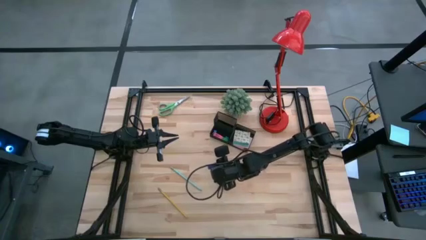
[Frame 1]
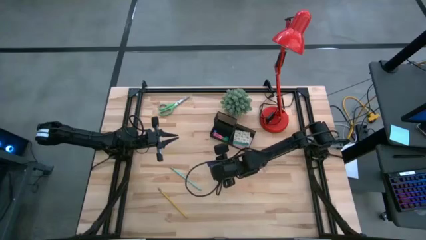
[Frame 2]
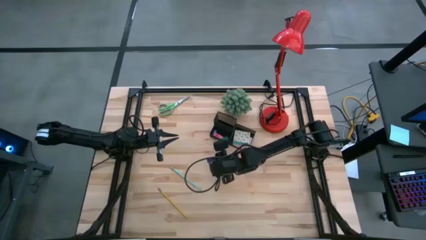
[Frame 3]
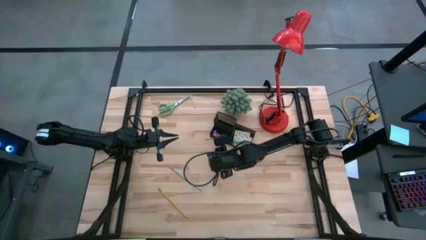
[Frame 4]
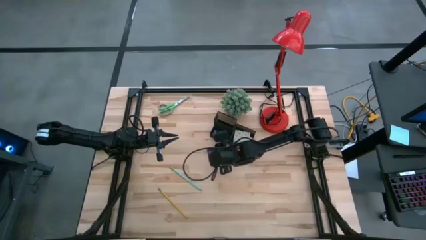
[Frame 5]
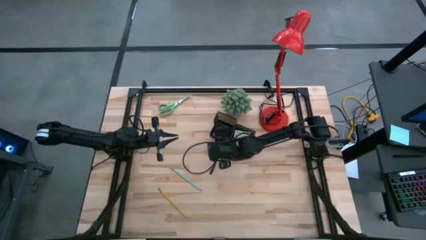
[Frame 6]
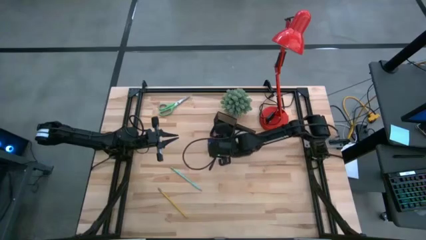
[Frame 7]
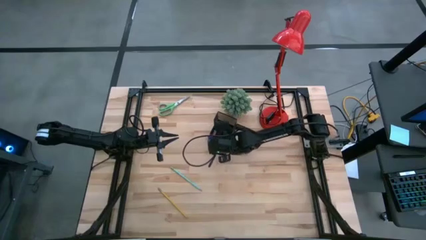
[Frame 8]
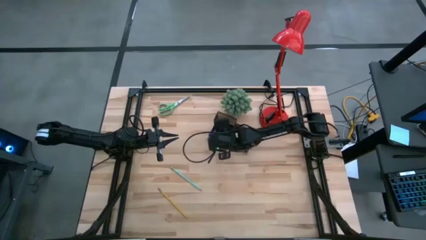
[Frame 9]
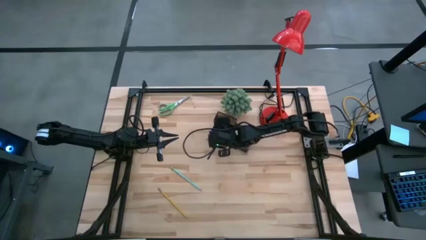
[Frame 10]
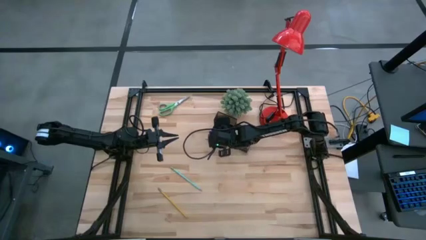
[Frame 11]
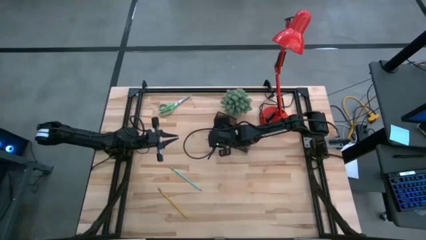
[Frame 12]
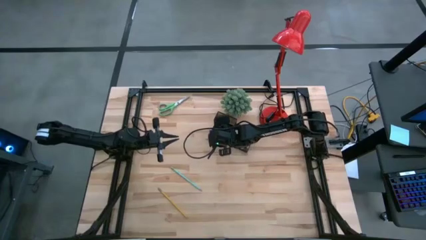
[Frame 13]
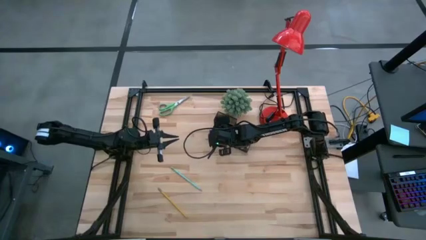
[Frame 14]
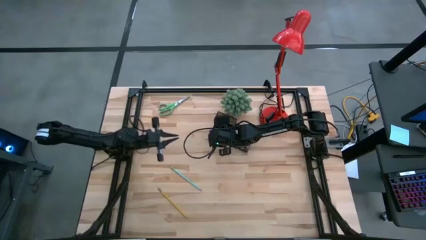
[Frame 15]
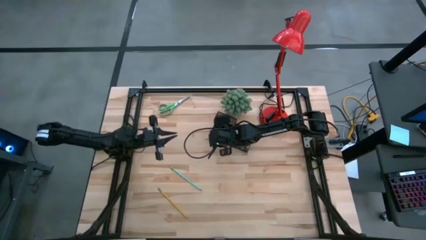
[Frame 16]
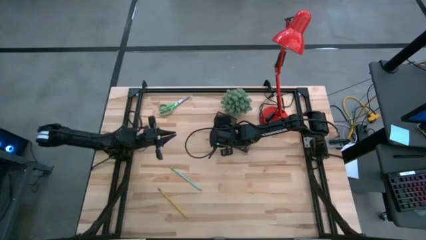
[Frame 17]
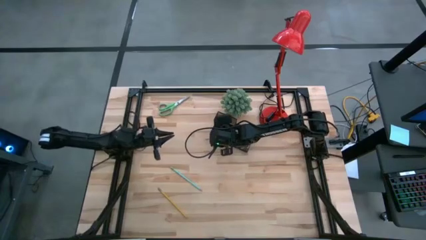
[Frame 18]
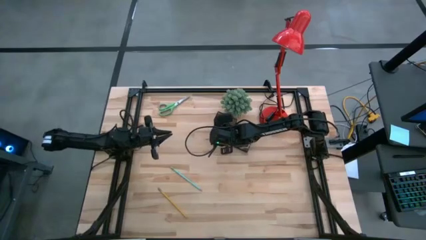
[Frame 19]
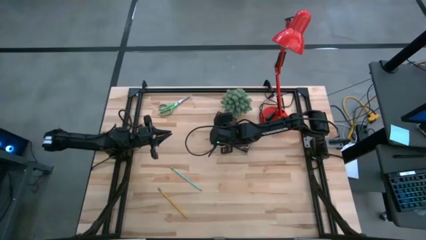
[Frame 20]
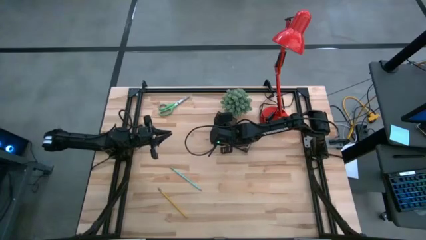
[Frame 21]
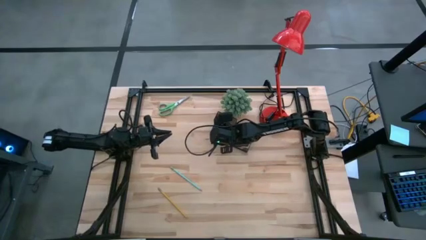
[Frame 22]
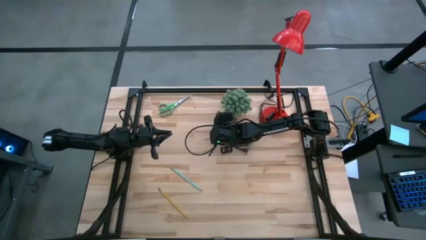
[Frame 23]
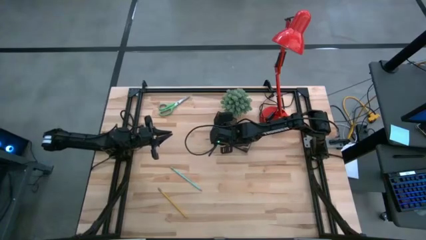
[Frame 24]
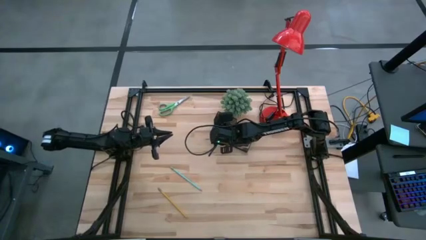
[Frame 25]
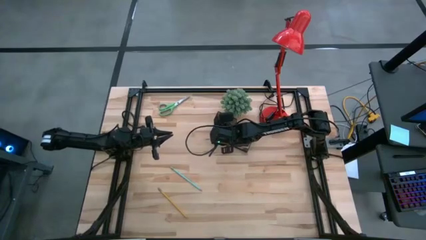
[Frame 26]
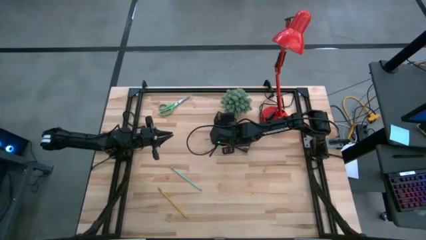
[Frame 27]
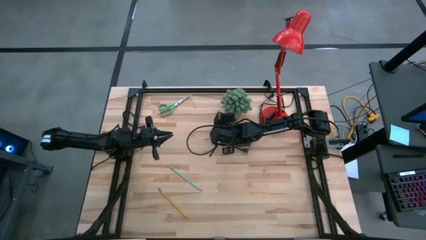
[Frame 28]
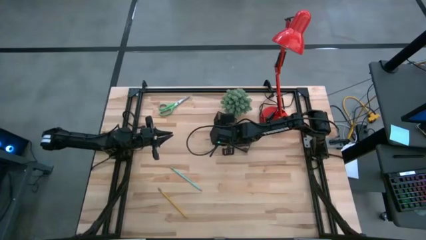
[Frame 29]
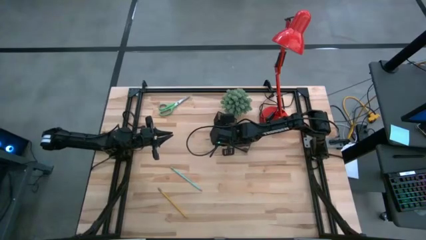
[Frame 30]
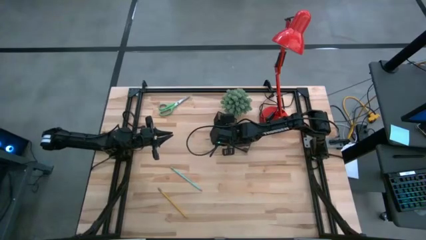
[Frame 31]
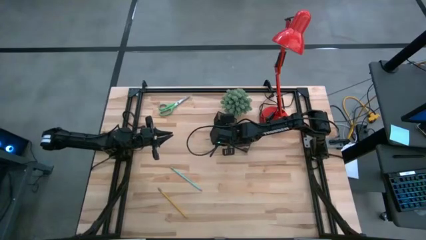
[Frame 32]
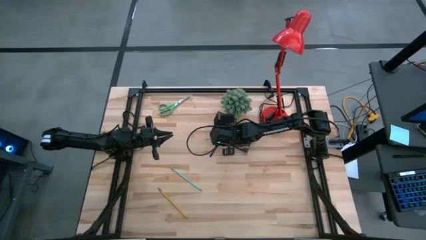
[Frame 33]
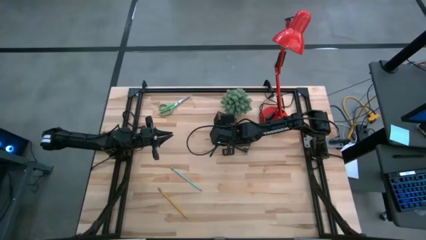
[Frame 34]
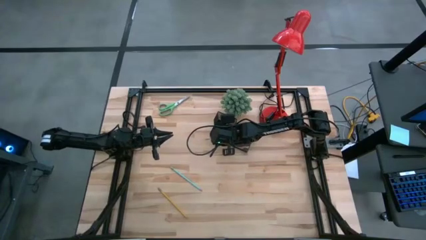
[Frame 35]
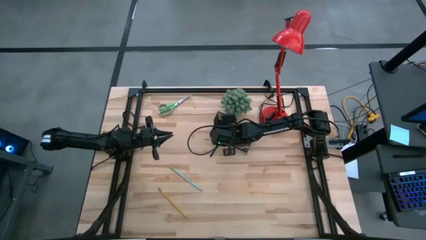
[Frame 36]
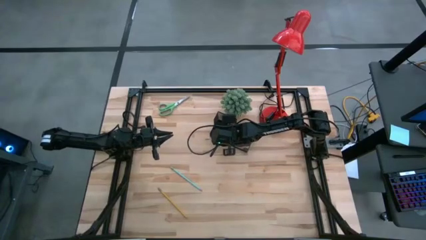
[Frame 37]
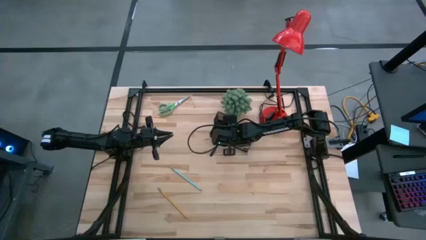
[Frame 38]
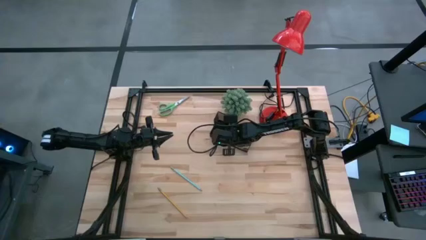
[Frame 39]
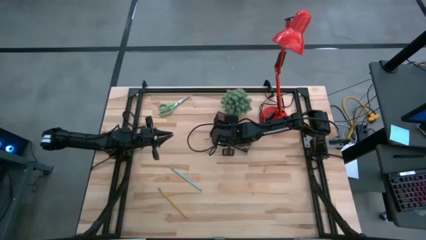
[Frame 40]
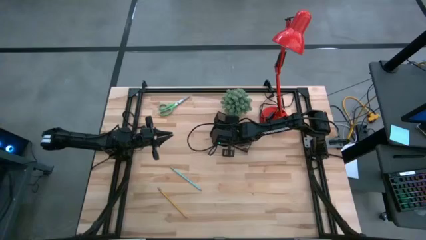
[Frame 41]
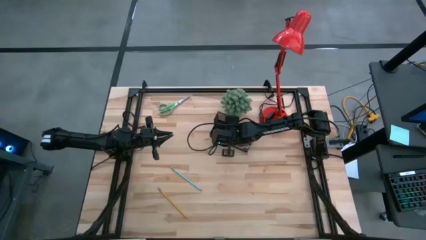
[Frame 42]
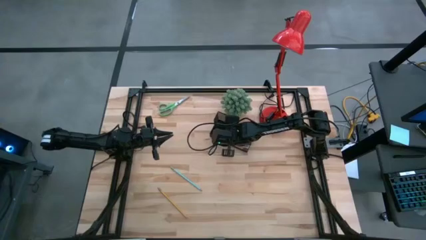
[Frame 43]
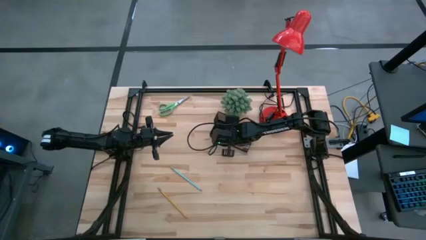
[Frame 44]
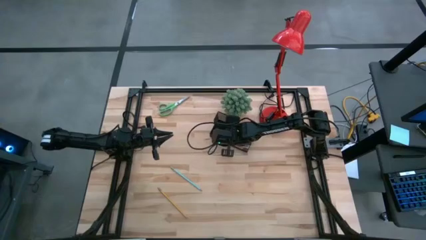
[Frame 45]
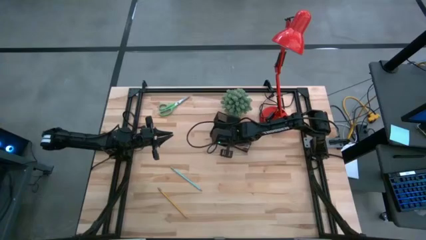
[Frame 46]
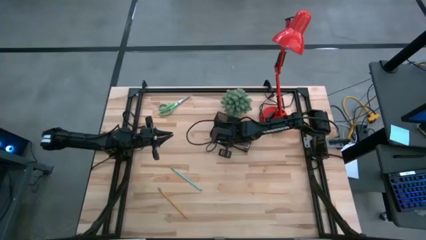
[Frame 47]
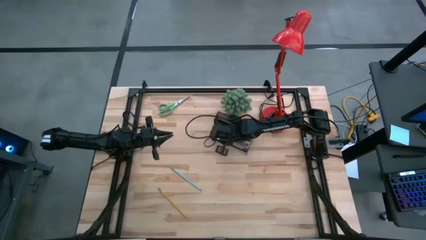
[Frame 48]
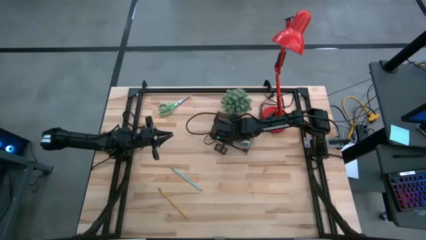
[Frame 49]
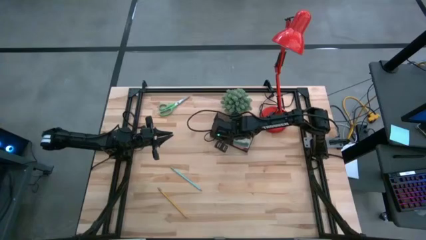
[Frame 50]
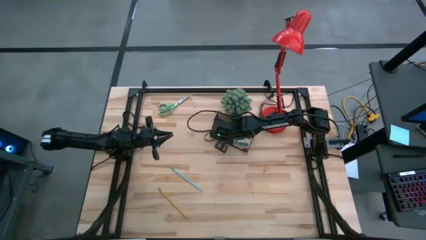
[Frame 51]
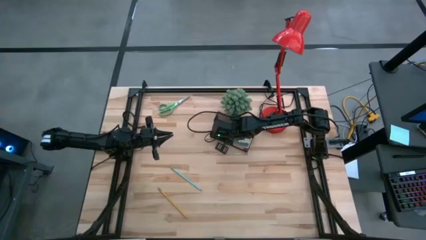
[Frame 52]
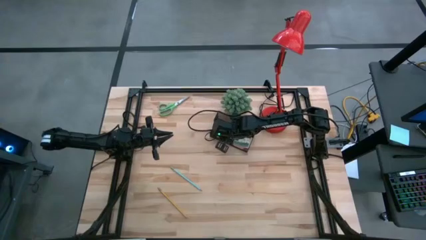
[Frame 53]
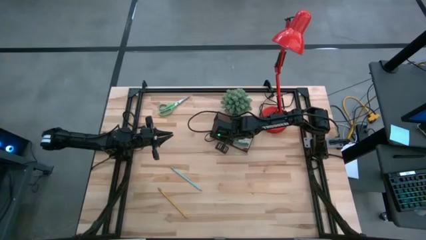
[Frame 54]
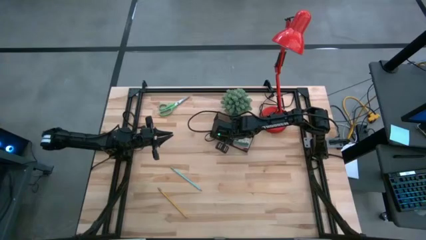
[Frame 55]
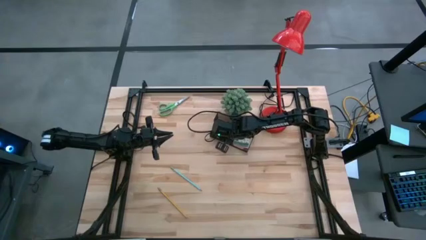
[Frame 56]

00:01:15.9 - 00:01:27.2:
Task: Pick and place office supplies into organizer
Put the blue eraser into the black desk organizer
